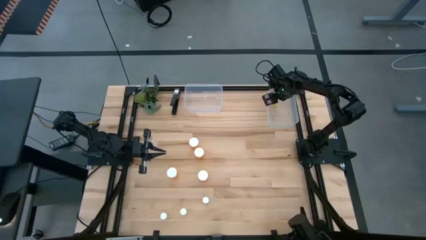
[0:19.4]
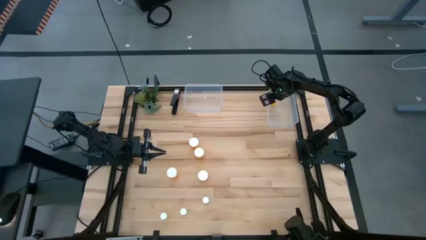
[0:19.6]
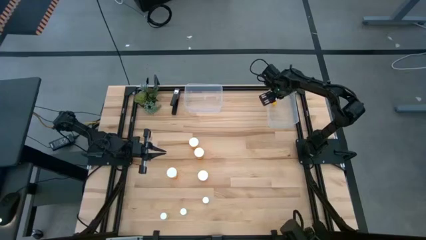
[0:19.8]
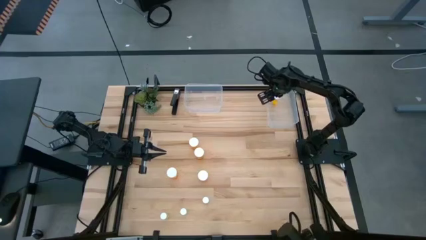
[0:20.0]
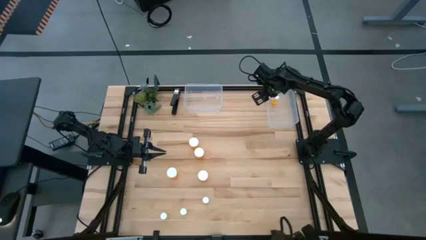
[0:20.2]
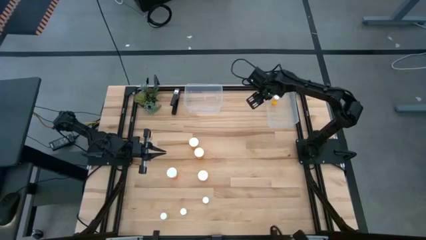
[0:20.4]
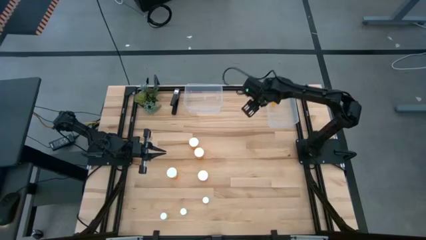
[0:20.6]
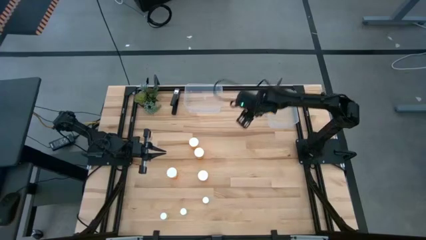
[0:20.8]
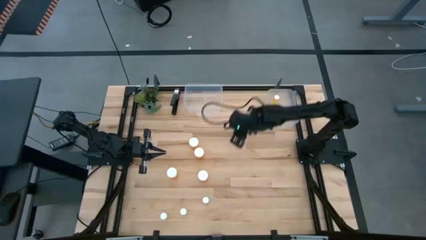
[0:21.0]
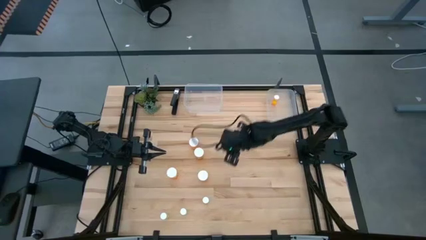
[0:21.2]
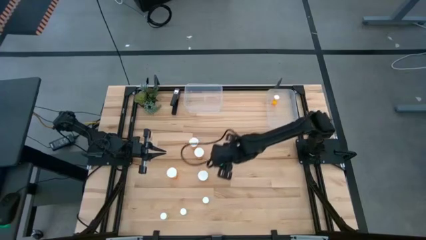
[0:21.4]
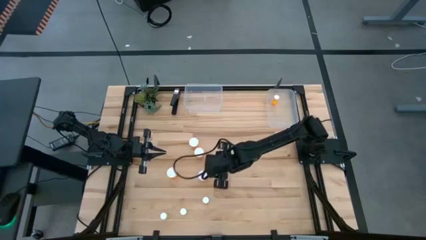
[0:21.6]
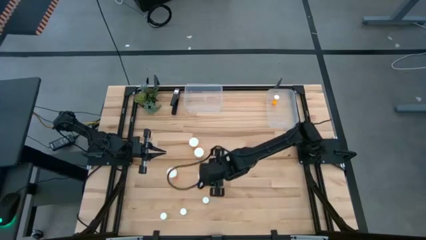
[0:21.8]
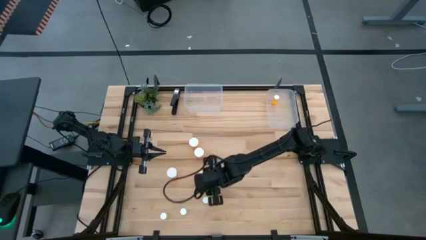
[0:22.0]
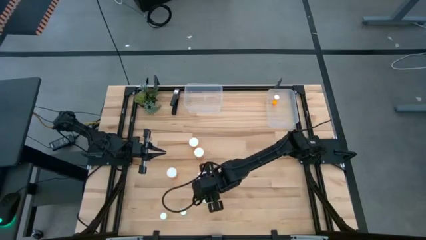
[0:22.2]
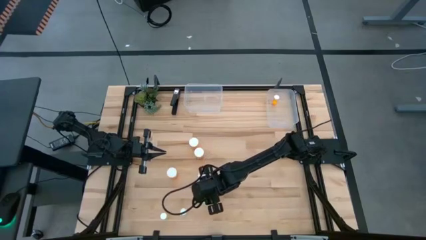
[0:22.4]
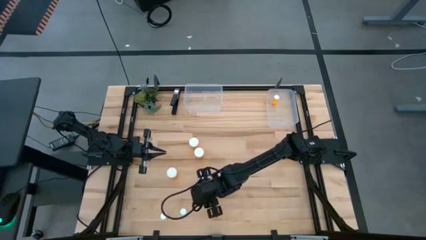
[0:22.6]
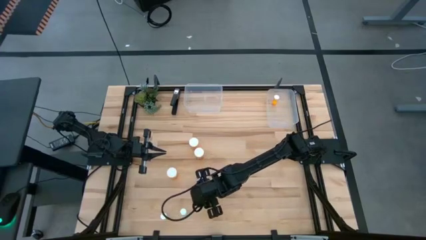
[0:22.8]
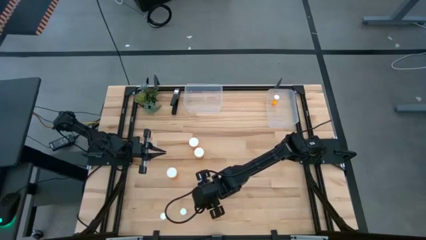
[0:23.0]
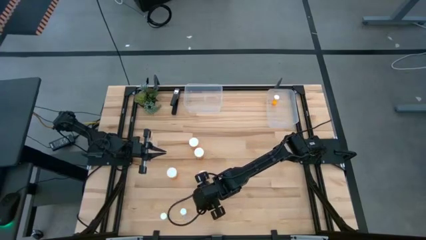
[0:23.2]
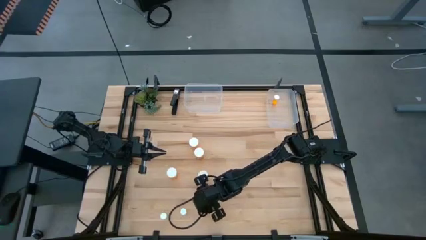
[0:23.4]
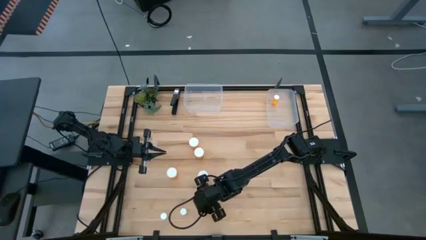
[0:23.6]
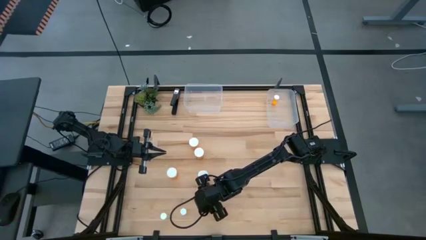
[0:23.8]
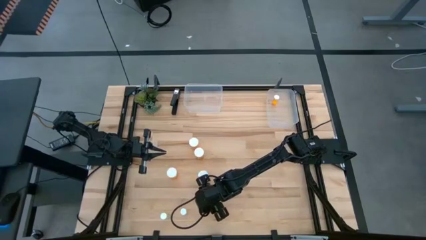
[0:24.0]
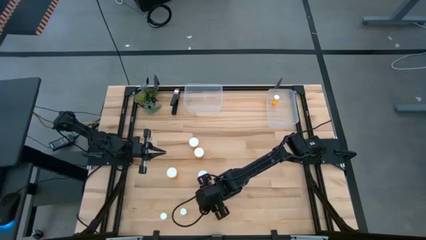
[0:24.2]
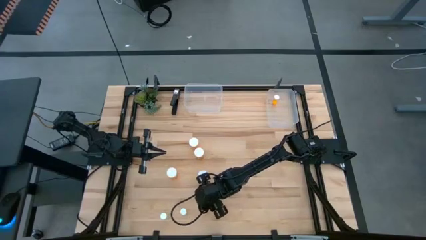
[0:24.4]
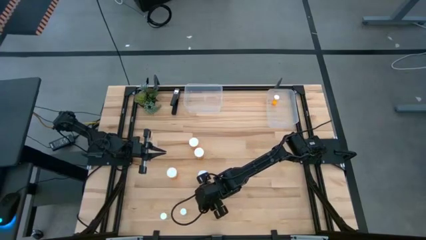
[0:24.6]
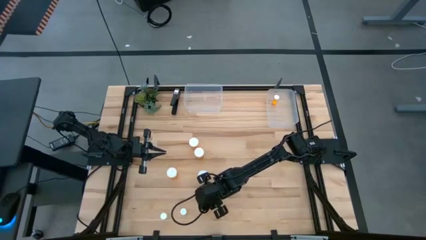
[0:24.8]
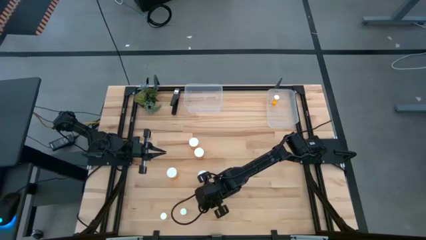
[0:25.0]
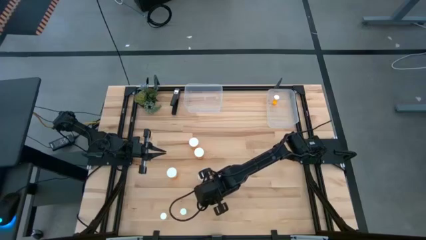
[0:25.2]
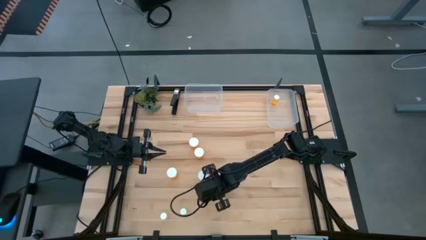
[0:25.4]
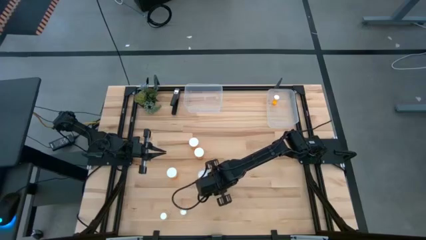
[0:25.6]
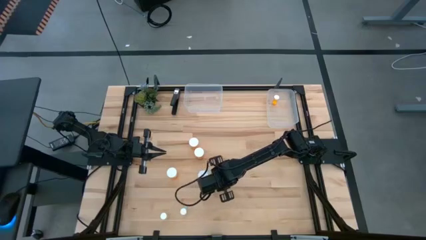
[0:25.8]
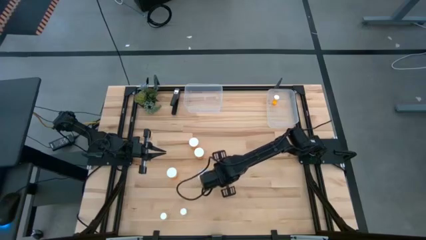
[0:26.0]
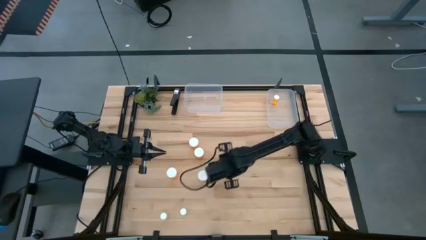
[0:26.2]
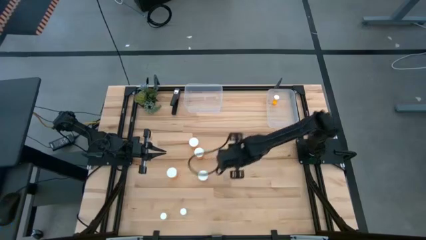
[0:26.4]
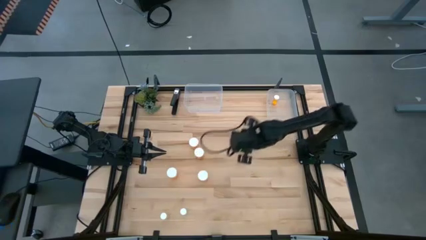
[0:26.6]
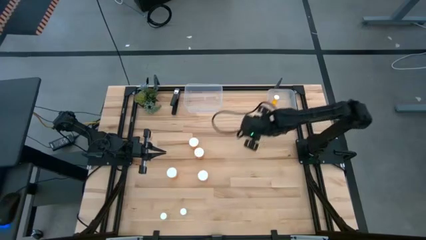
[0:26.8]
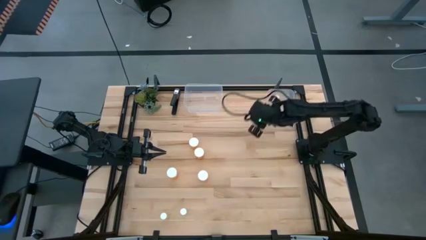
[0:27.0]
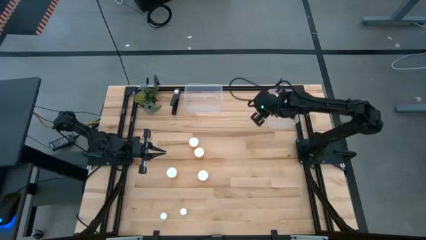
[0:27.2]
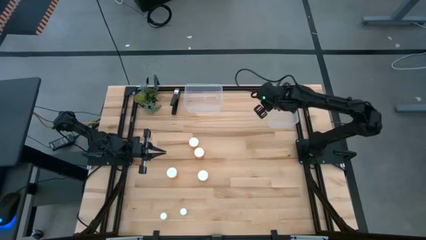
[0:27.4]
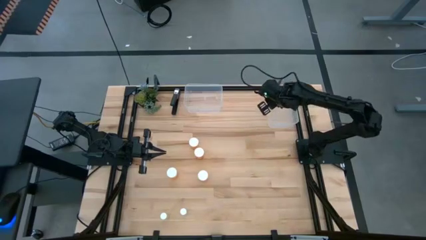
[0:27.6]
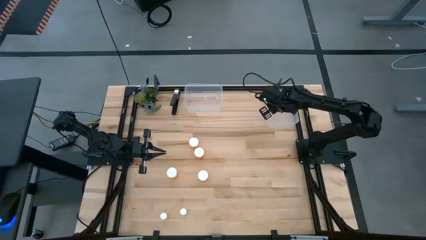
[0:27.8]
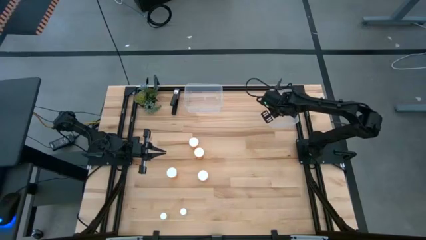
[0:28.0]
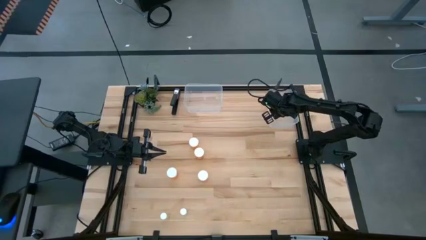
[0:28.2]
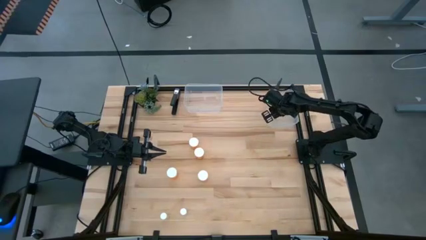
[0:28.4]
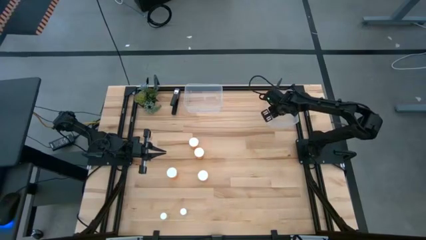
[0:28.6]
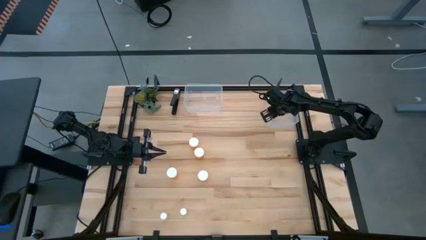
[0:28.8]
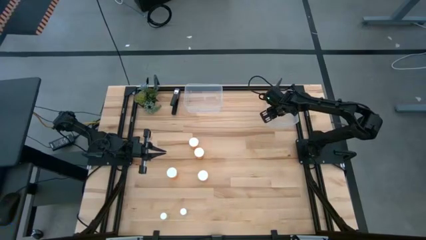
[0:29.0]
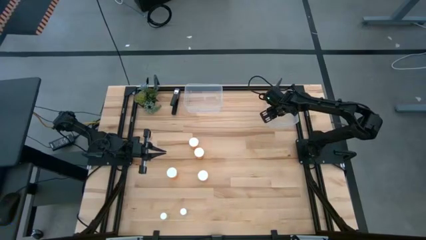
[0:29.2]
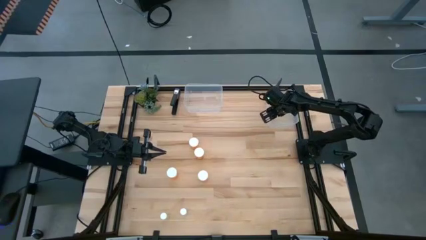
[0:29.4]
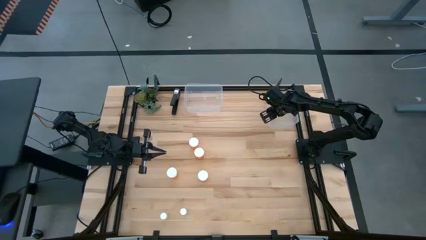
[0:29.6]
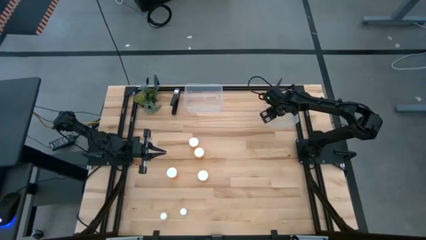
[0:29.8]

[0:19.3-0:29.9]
Task: Pick and place medicine bottles into bin by pill shape (circle, oval)
Put the top small yellow pill bottle into the right transparent bin
